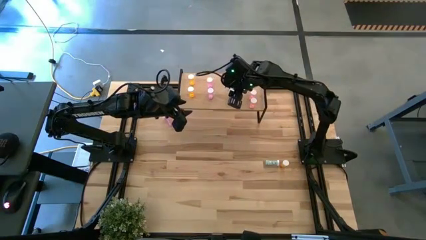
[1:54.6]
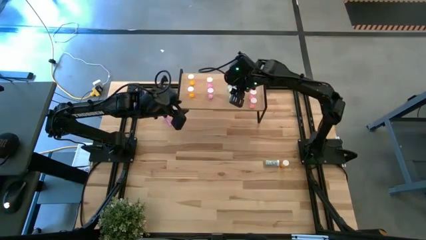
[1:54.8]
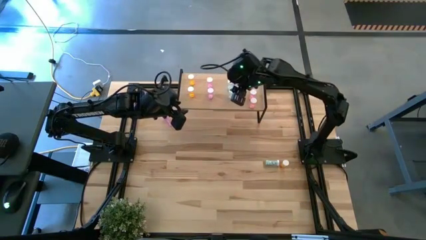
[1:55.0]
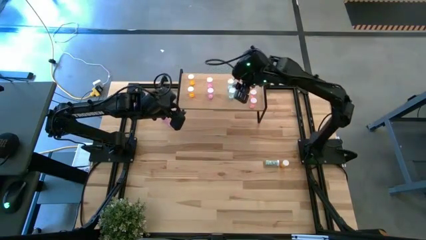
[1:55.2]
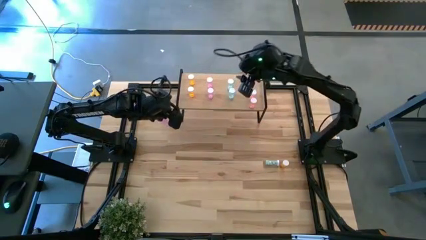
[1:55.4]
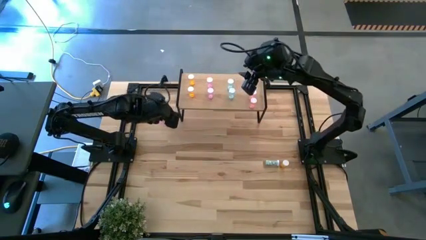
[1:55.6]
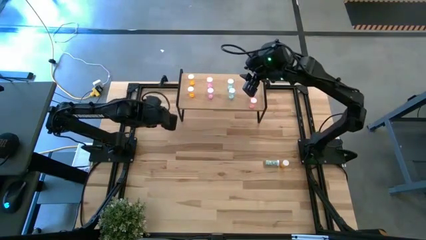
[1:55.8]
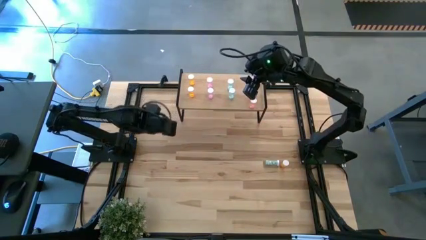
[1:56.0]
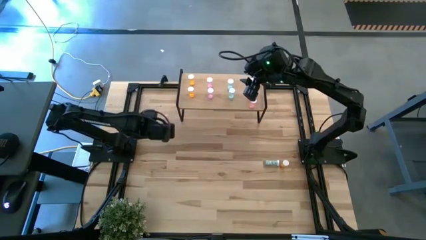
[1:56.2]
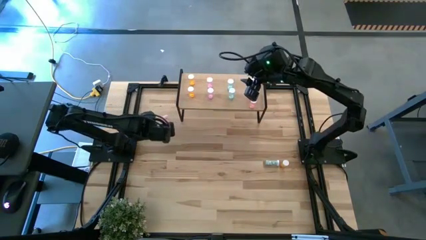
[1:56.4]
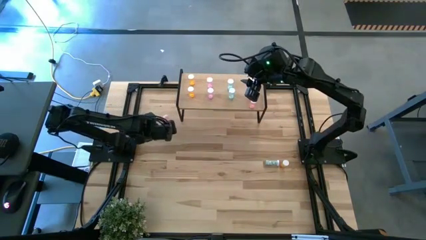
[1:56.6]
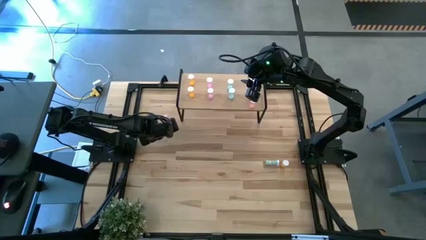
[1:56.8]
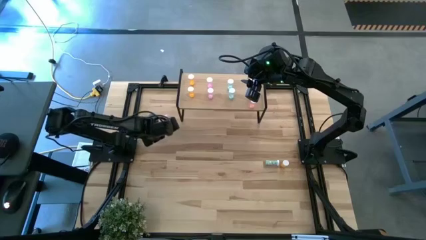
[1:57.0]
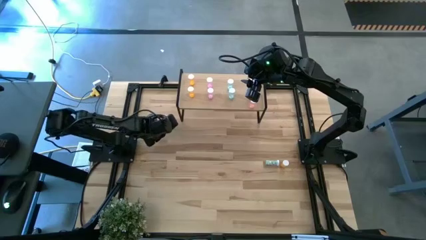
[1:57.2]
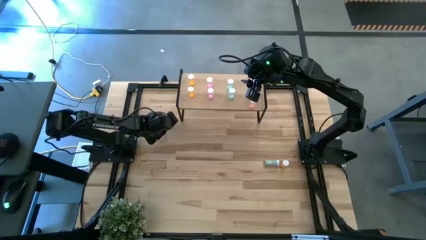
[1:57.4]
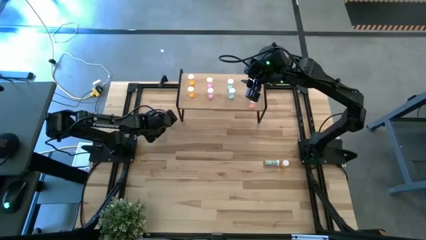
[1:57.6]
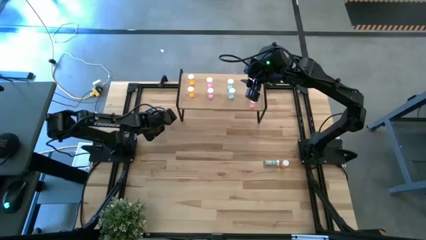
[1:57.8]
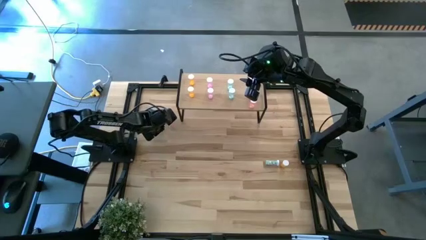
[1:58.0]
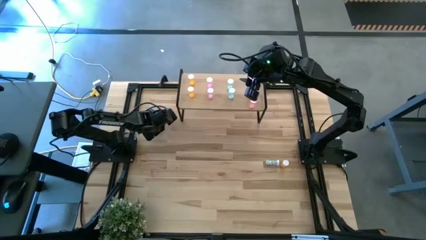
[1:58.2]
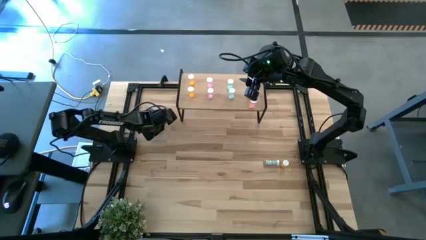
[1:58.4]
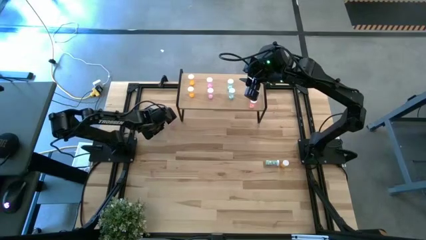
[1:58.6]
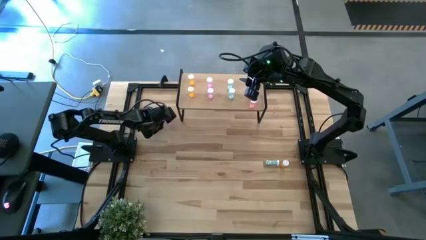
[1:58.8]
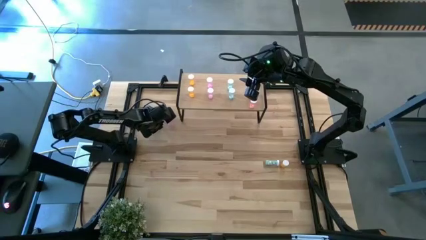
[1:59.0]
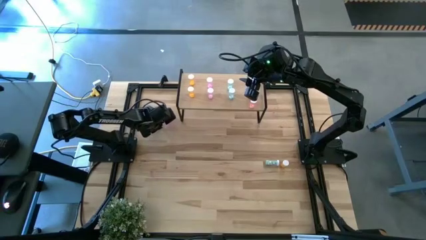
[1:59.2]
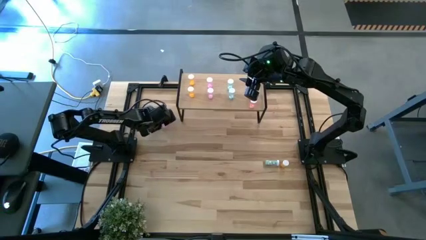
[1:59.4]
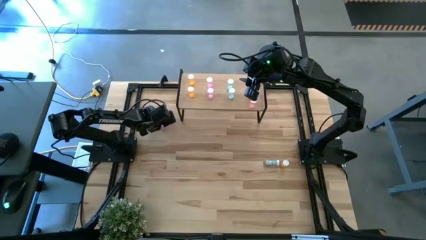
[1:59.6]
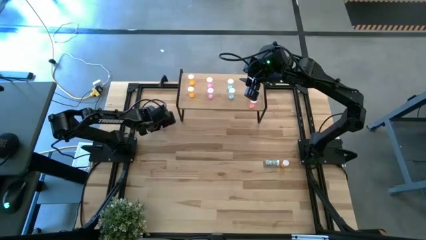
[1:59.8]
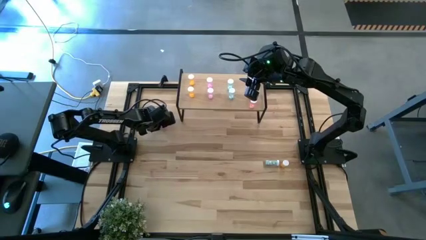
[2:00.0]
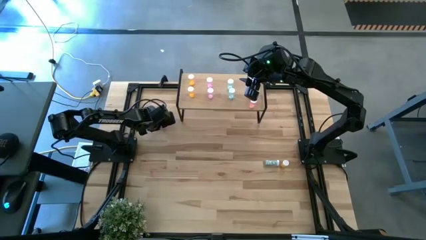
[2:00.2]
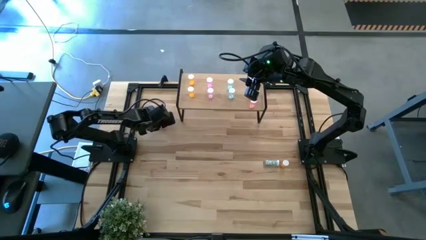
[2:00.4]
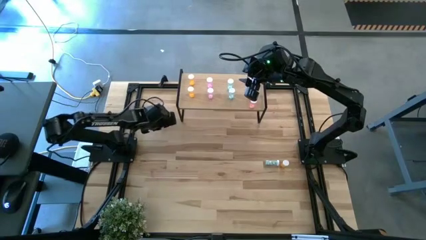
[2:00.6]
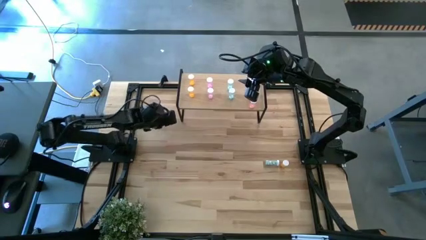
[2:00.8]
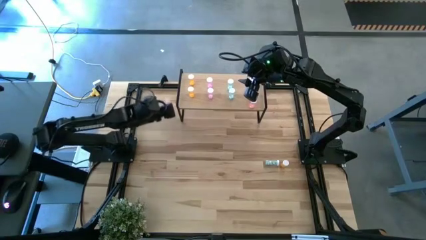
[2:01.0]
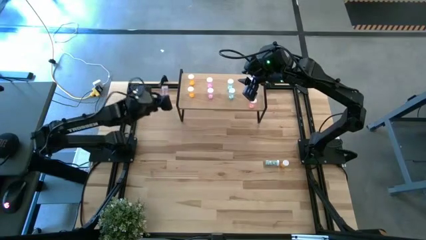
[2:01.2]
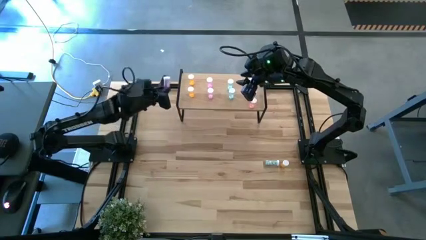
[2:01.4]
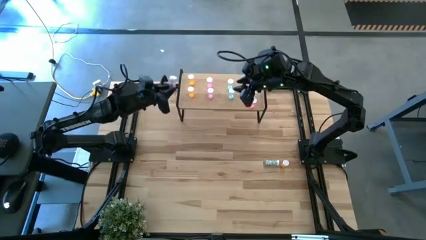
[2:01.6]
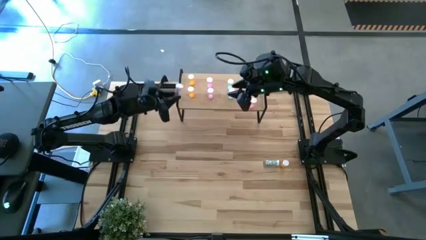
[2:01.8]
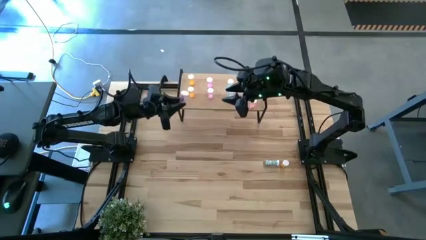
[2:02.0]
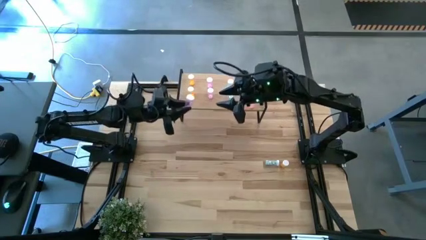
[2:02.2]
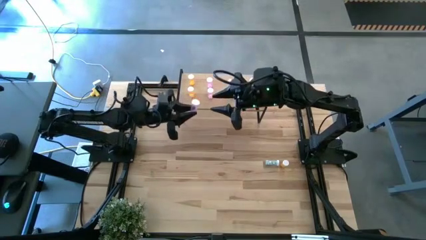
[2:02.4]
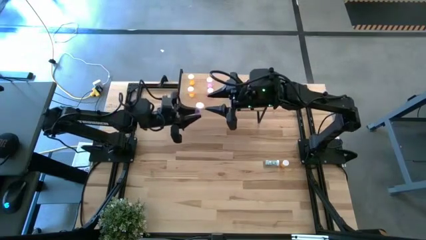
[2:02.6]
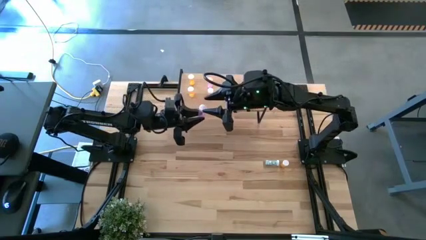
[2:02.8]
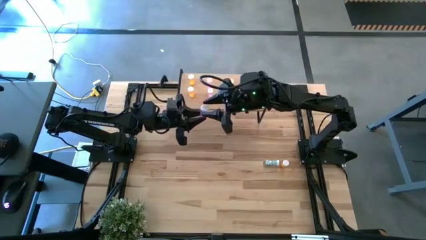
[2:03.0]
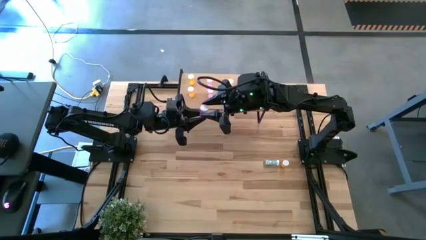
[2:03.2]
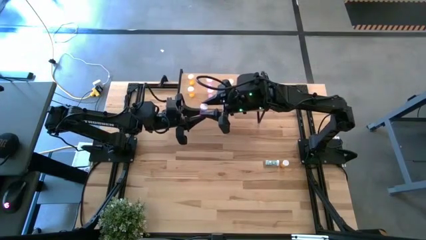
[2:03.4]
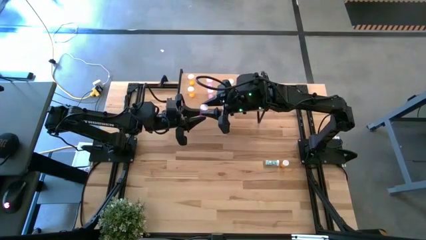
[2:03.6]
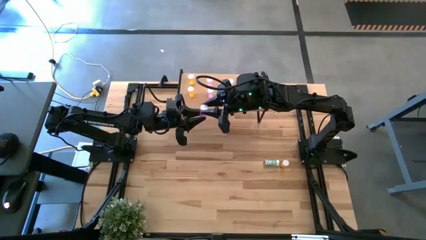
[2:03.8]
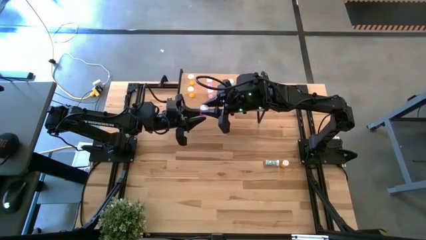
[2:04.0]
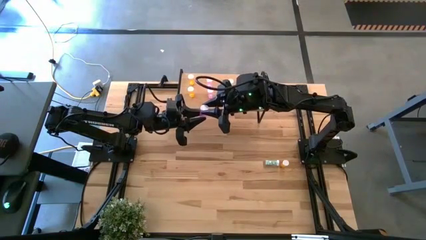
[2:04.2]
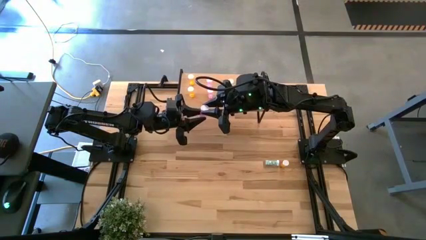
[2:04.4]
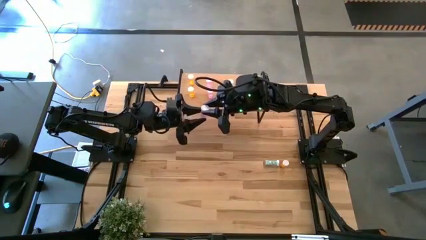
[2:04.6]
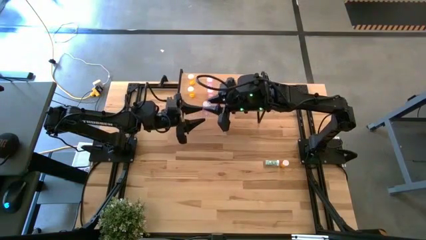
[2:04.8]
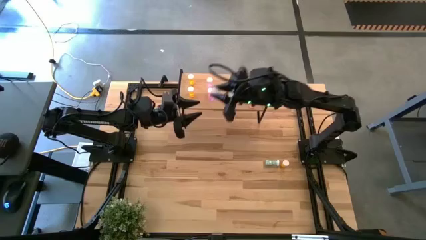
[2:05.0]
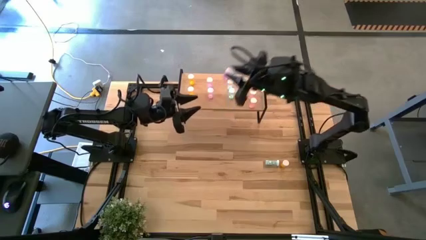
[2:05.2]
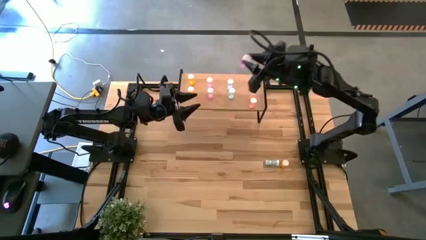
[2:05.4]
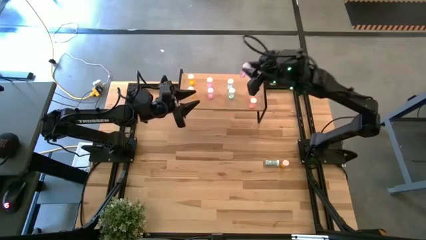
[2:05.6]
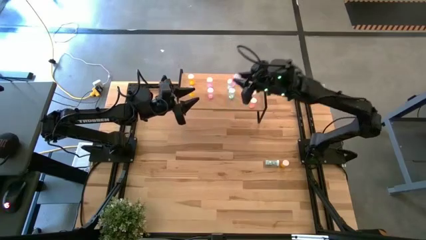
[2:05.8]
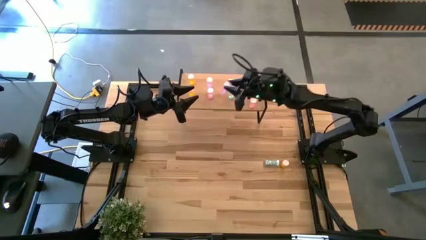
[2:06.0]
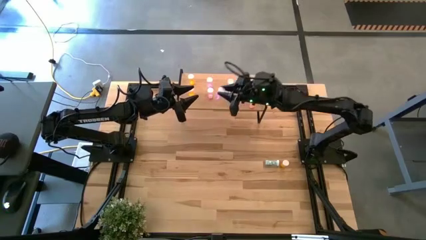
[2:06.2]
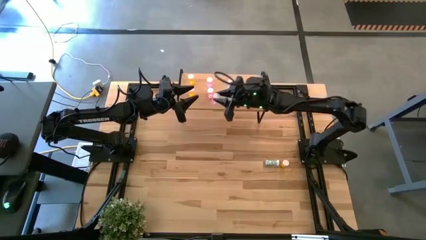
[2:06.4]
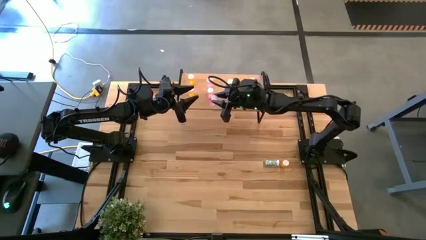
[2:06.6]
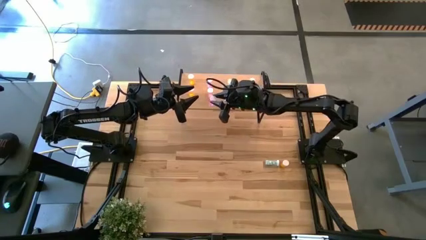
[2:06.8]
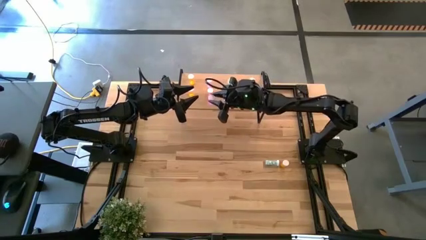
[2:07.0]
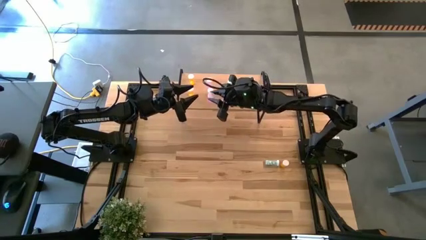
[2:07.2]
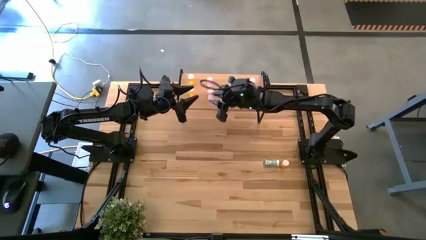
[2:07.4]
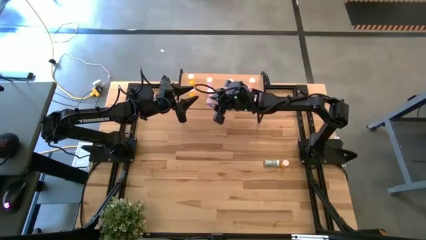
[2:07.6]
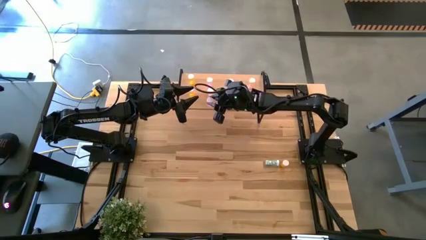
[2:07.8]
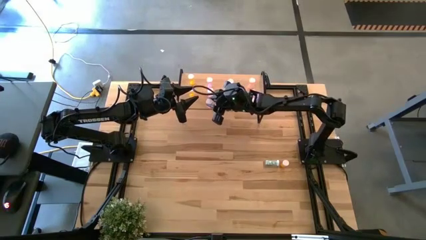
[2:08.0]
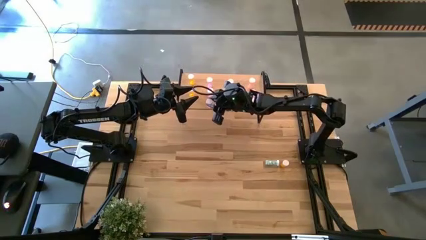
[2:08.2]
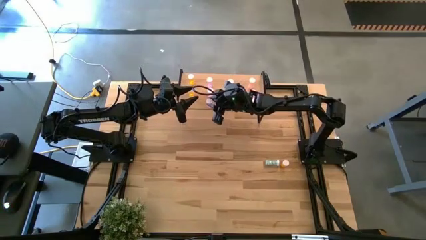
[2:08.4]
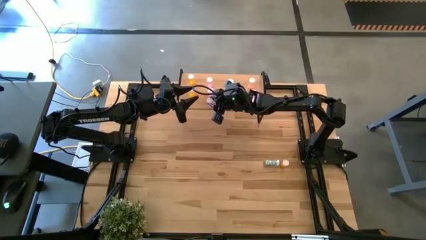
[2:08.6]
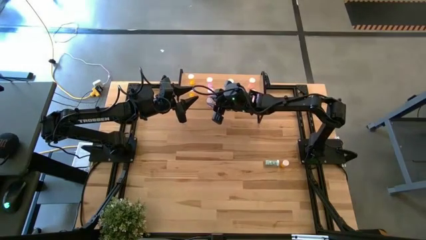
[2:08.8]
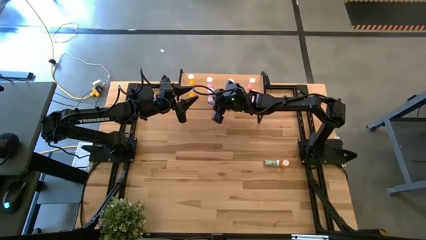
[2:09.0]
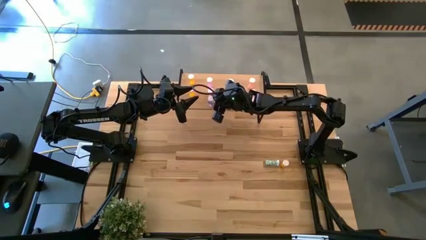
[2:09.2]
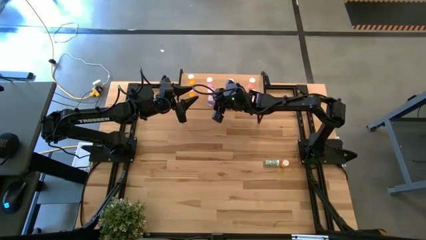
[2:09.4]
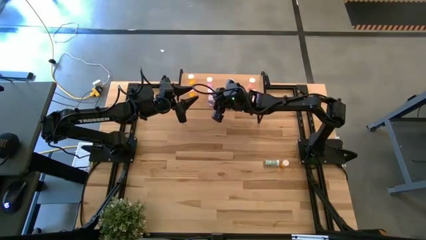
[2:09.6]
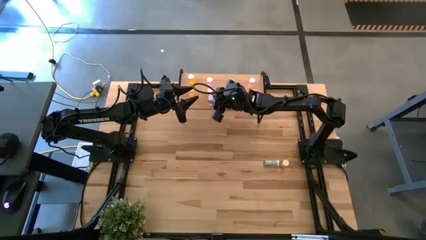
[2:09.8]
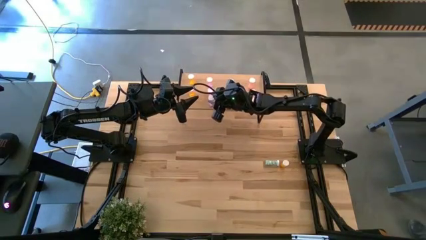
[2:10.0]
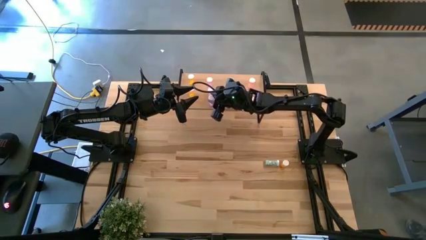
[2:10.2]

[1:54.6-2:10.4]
Task: Pick and place medicine bottles onto shelf by color
Put the purple medicine bottle on the shelf aligned with the other purple medicine bottles

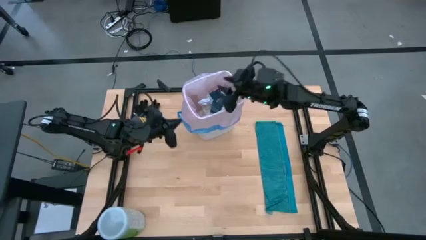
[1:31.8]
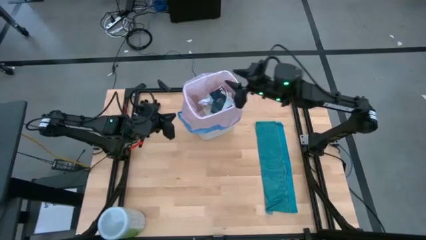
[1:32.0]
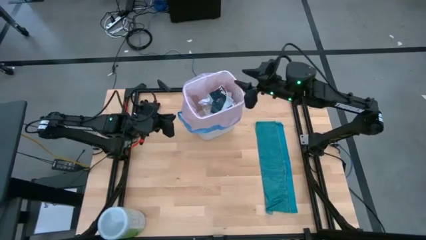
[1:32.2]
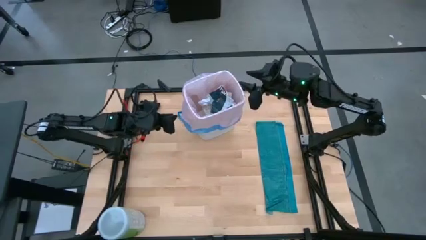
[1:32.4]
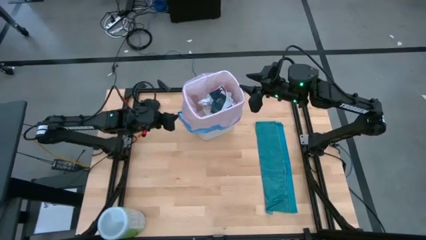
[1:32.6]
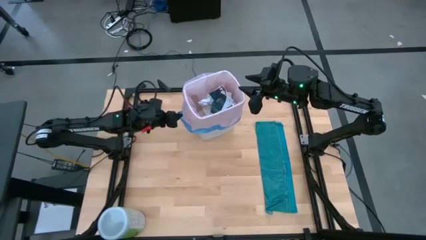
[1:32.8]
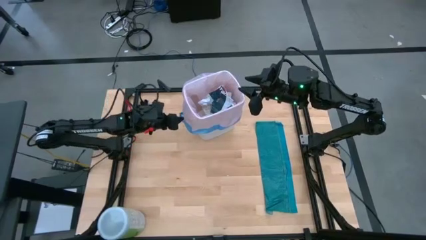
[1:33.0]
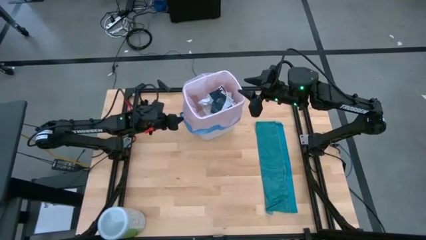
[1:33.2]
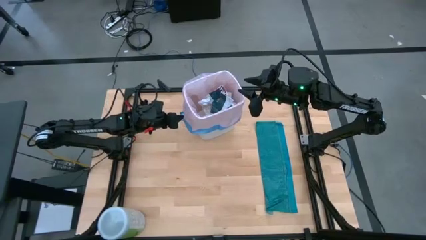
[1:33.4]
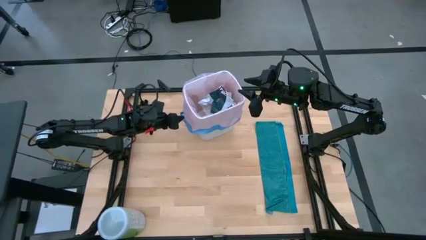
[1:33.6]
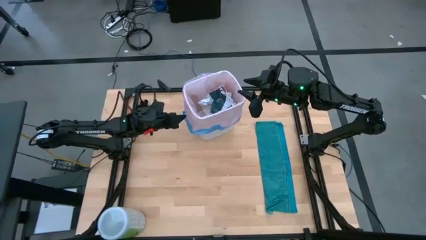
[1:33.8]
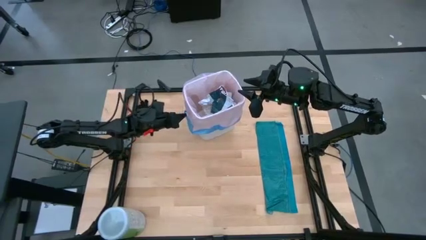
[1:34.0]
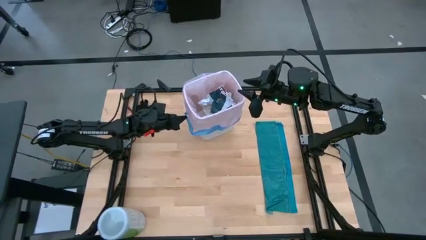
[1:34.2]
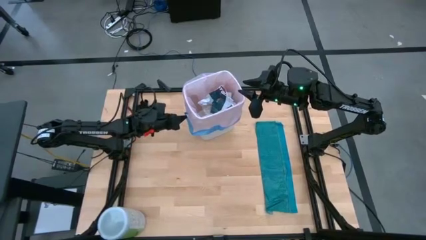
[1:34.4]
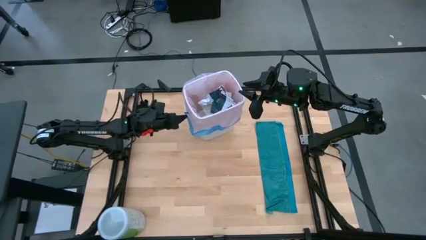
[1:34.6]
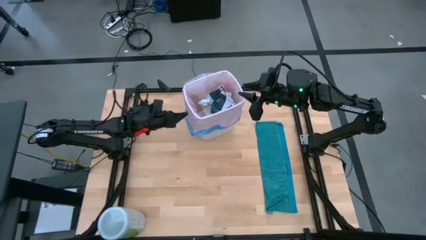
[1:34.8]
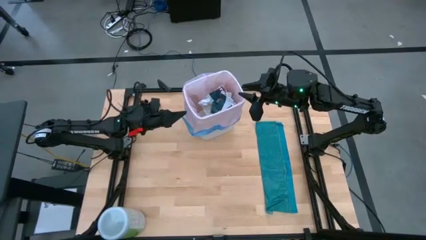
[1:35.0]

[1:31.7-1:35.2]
Task: place trash/remove bag and relplace
Remove the trash bag from the white trash bin
